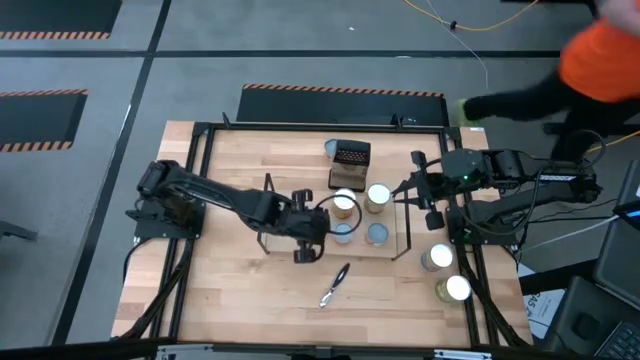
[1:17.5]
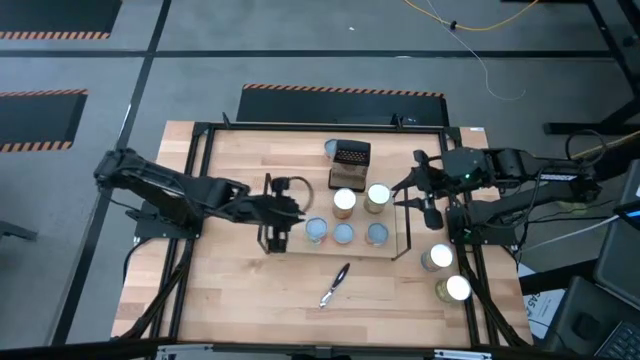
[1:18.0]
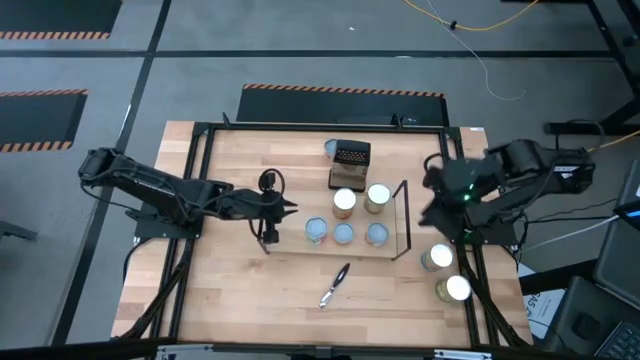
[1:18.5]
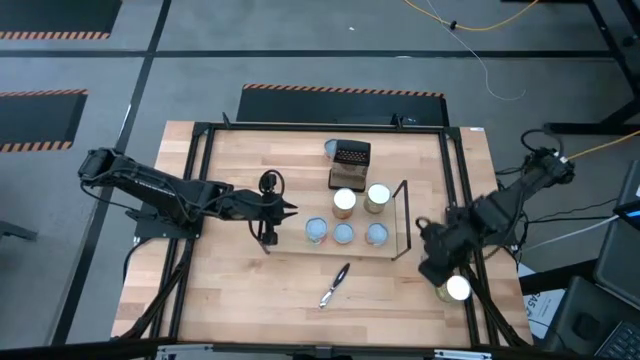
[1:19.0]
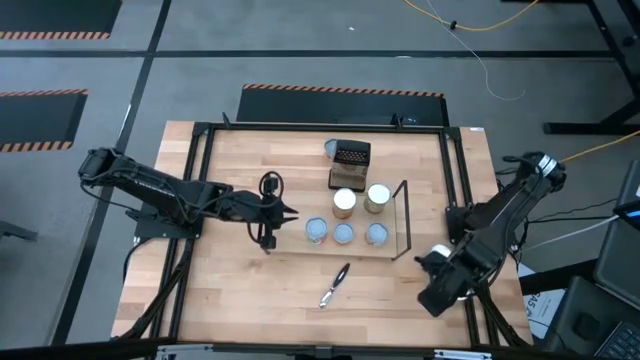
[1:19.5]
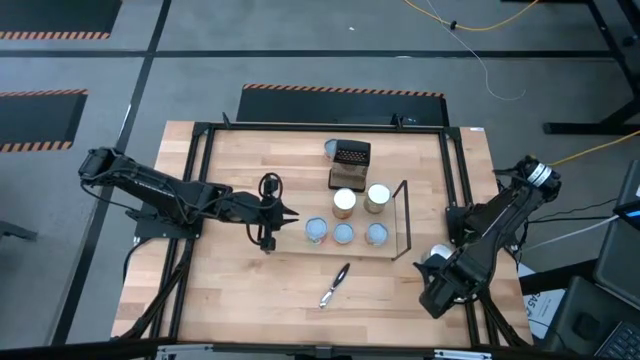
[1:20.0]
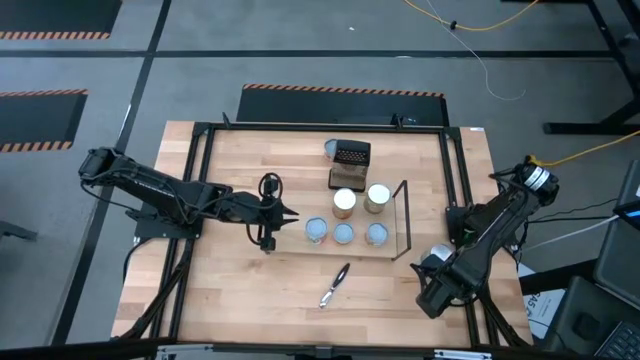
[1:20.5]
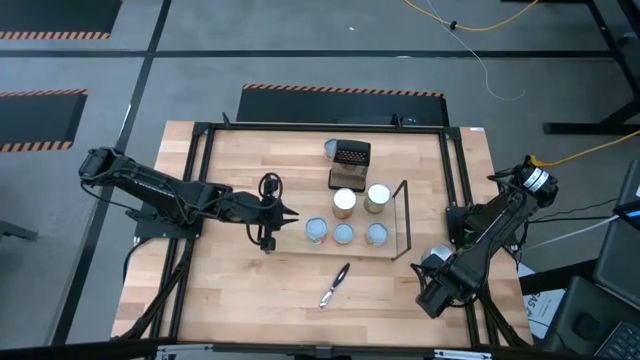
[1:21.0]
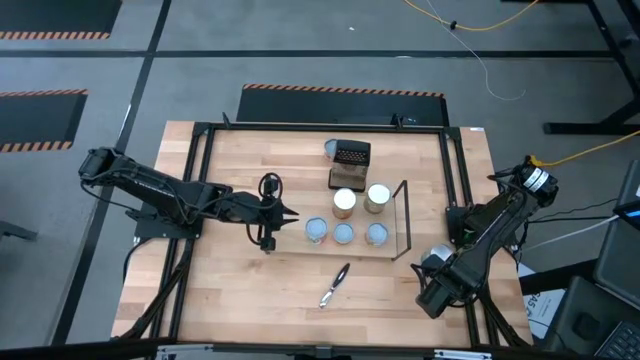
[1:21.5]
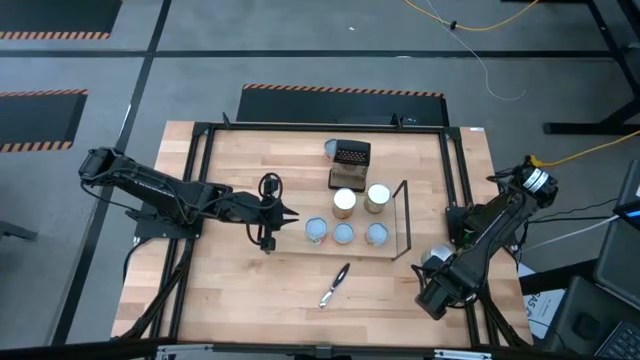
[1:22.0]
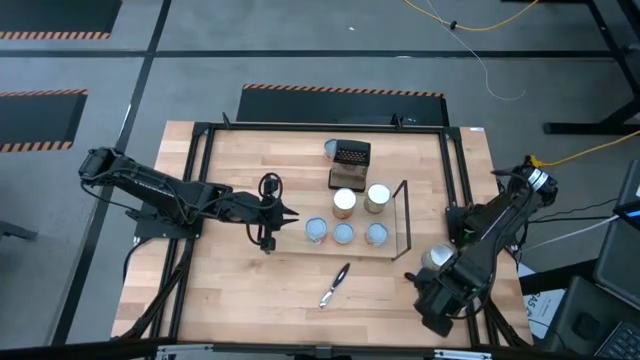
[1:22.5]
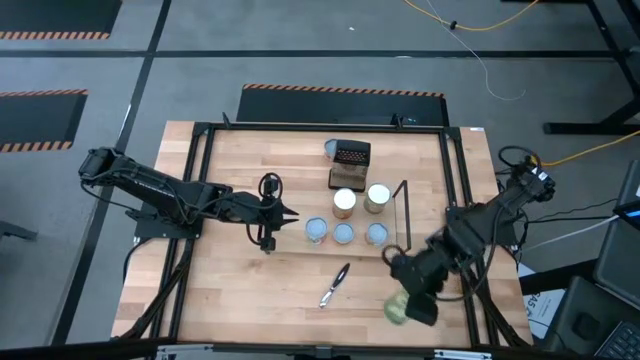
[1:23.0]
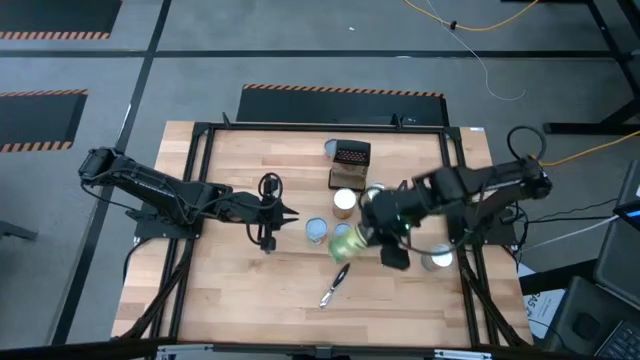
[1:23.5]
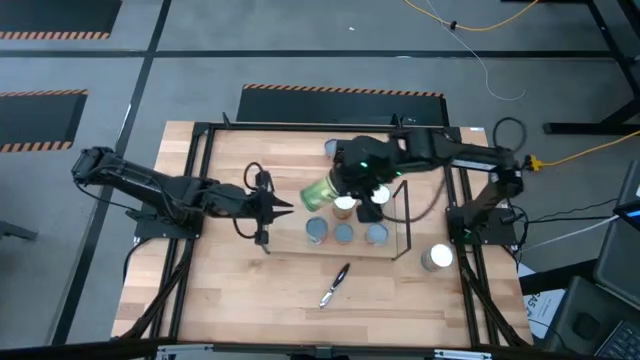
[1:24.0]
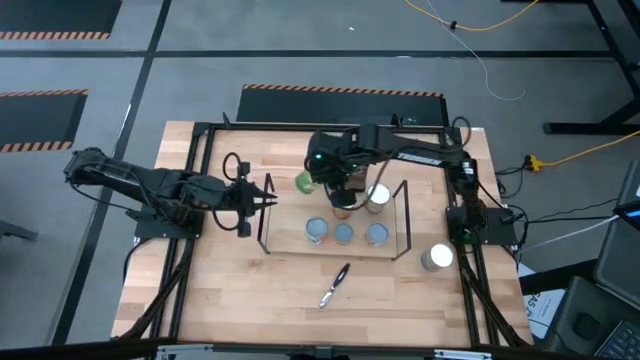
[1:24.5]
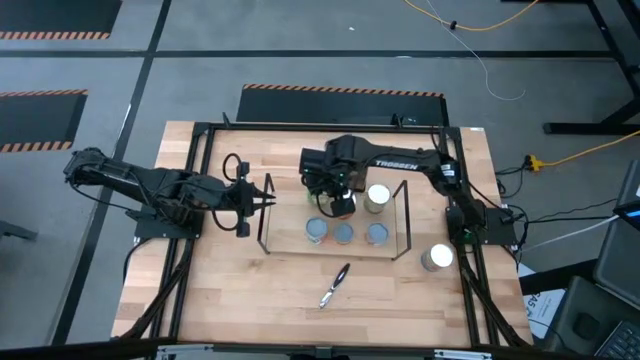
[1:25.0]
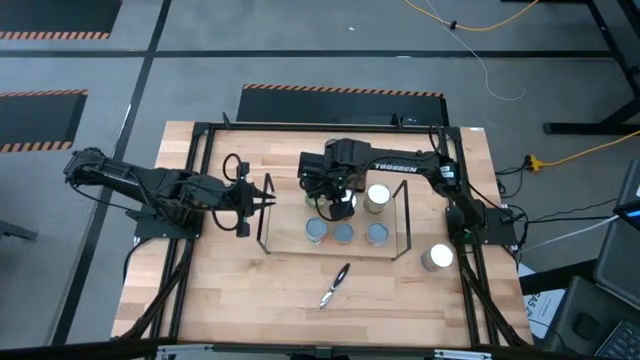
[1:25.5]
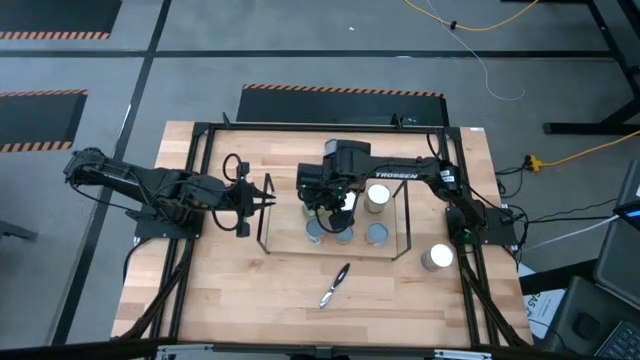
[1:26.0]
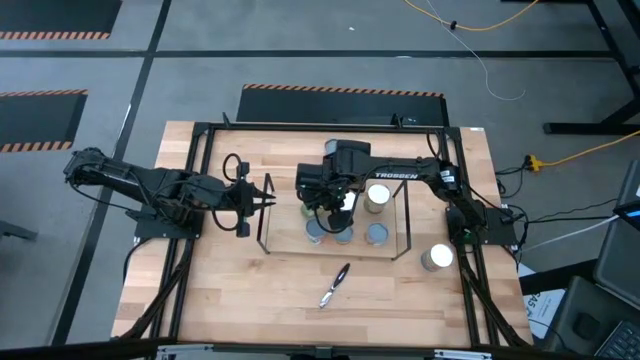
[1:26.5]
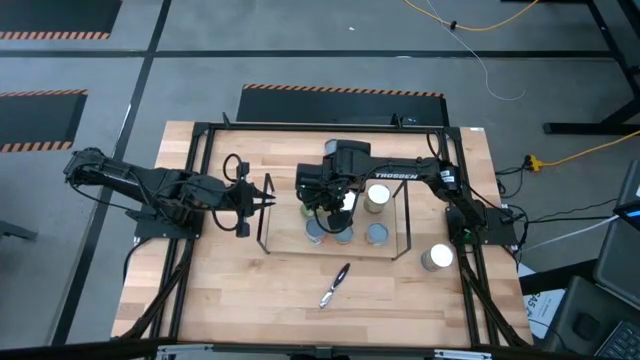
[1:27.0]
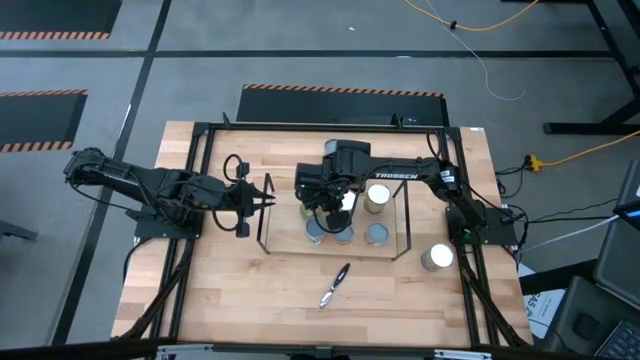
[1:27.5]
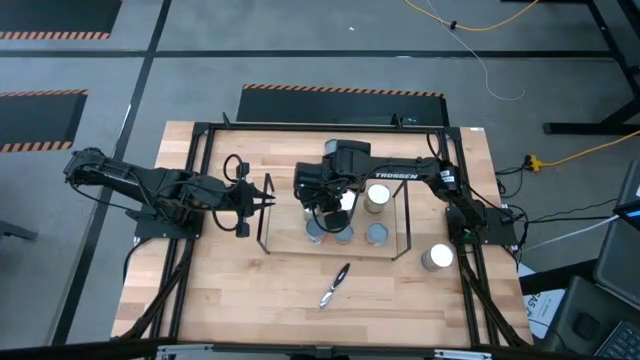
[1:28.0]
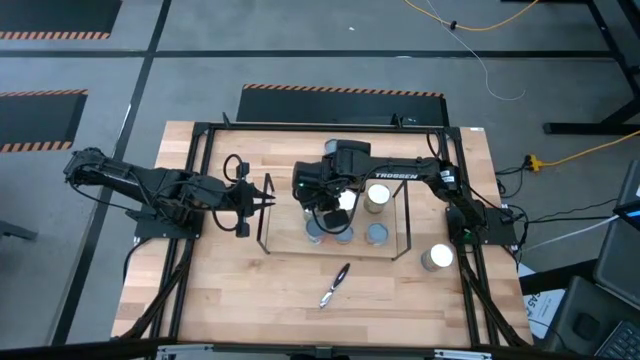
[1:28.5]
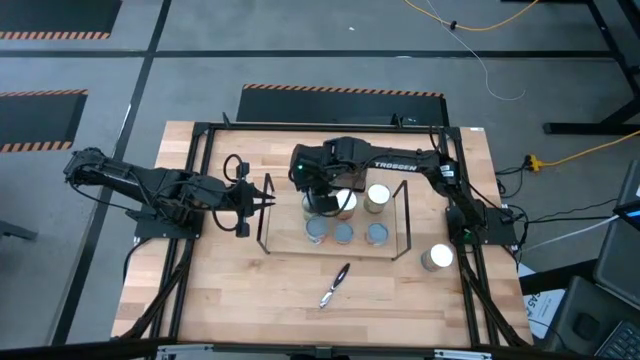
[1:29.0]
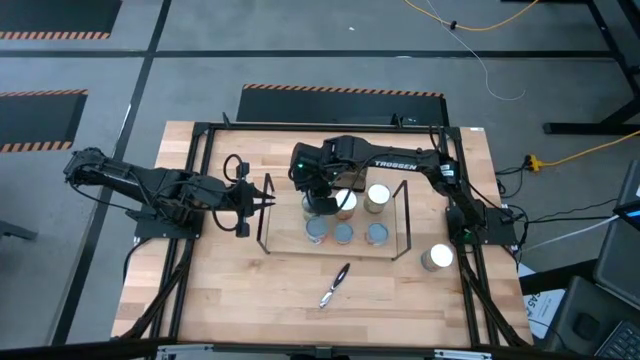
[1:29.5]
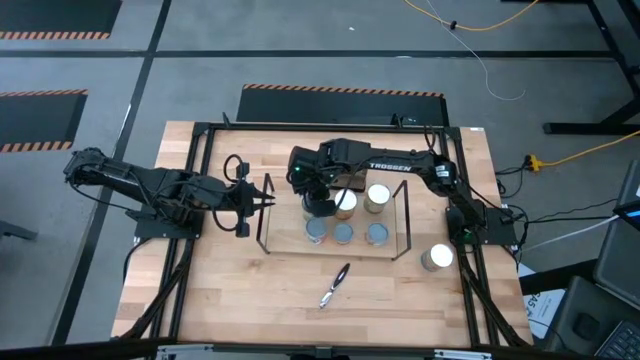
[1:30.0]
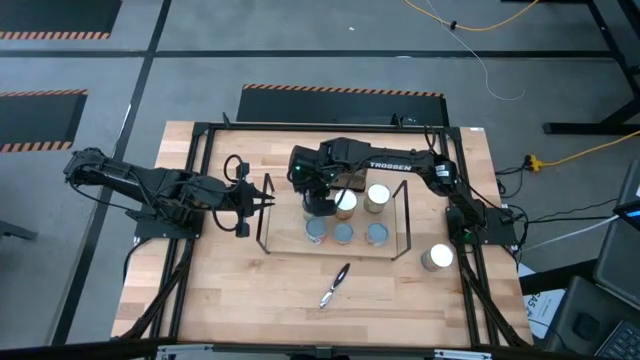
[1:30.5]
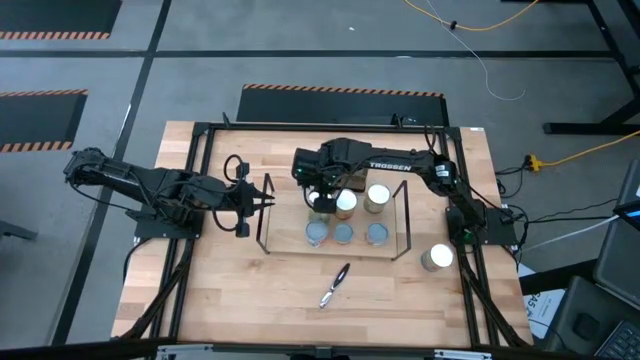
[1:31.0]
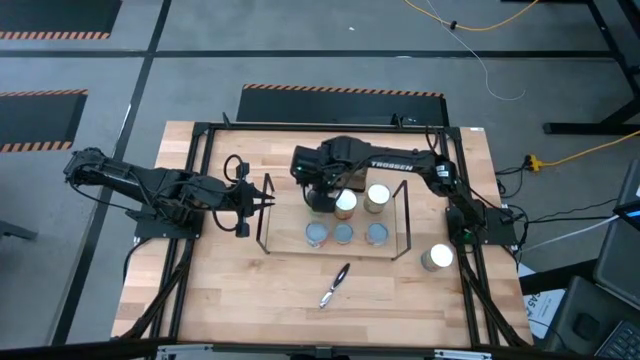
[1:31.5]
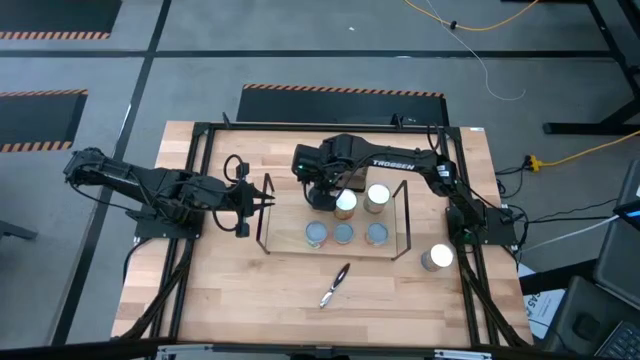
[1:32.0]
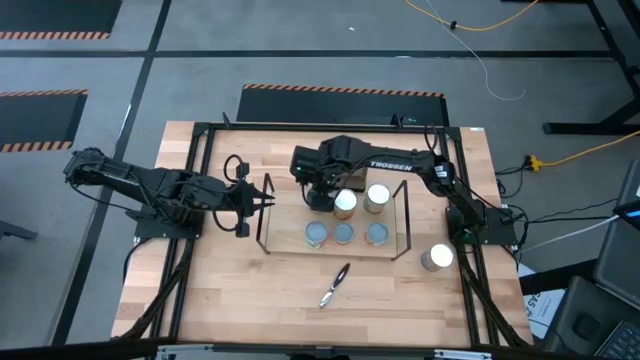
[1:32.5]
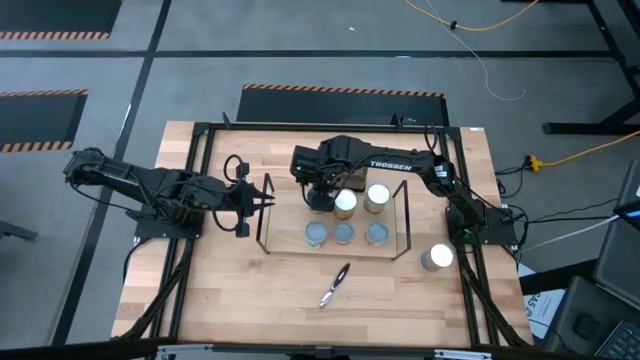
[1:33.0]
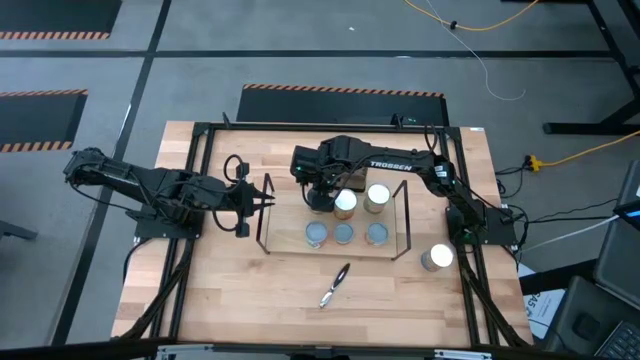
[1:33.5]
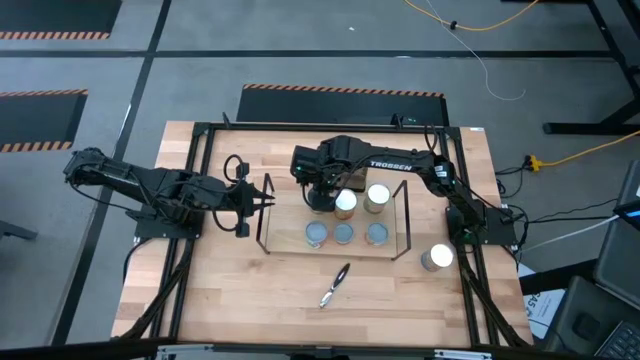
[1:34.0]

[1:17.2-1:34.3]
Task: Pick and place cans onto a shelf
Put the canned peaches on the shelf

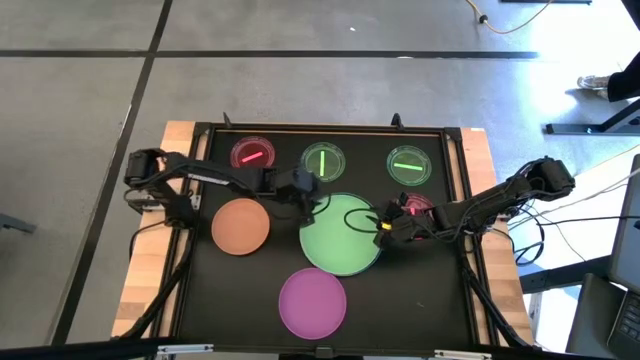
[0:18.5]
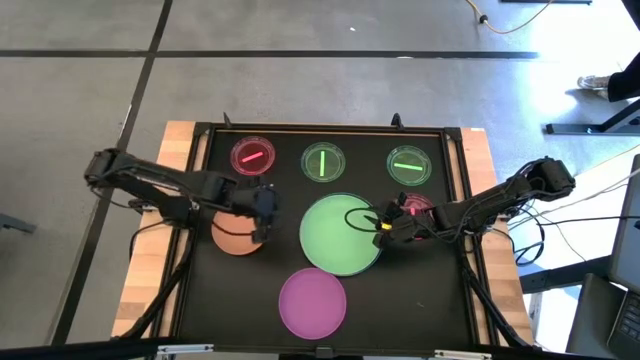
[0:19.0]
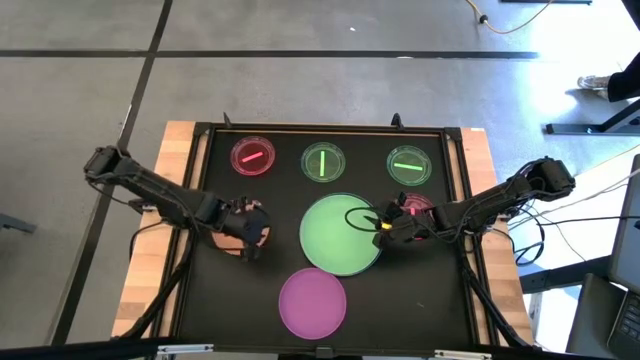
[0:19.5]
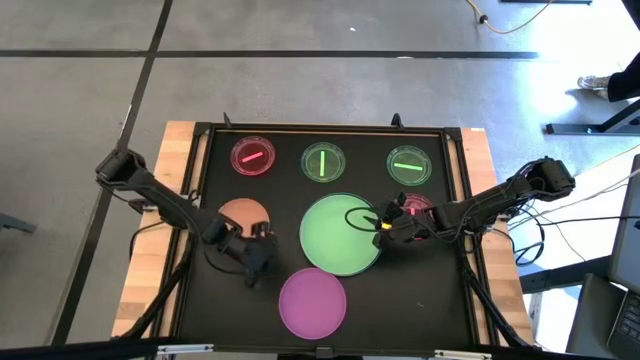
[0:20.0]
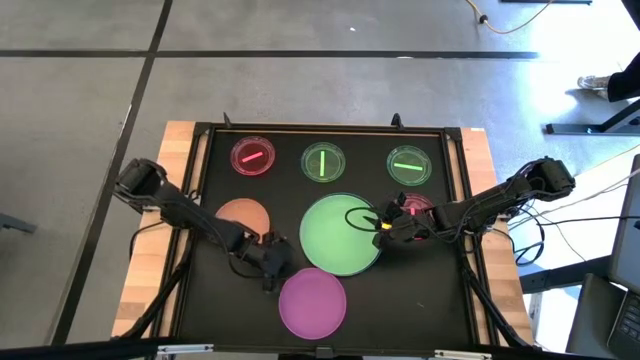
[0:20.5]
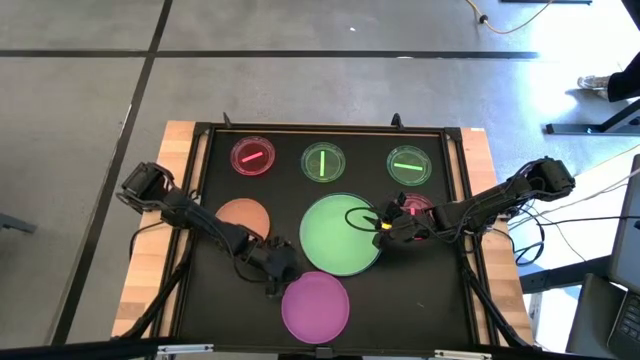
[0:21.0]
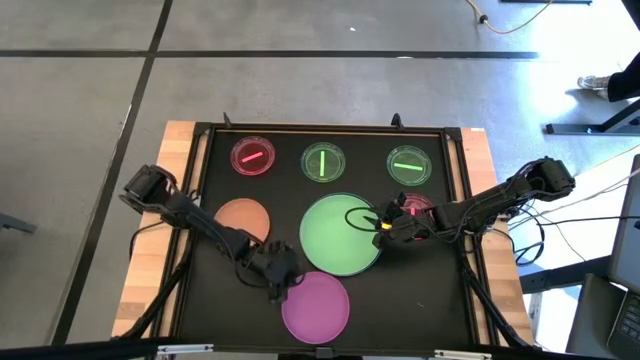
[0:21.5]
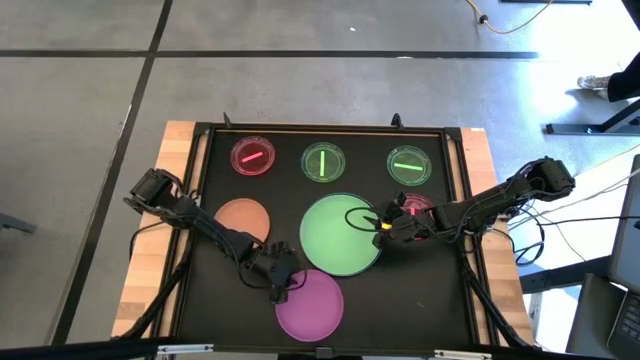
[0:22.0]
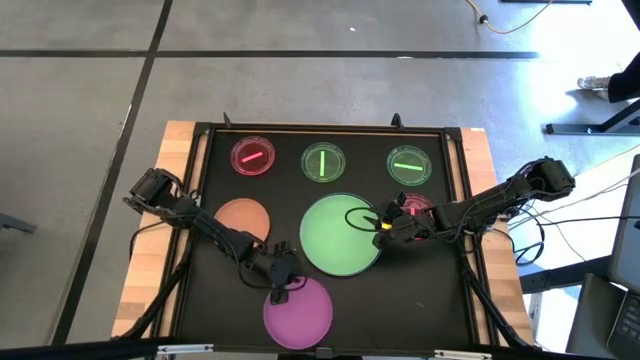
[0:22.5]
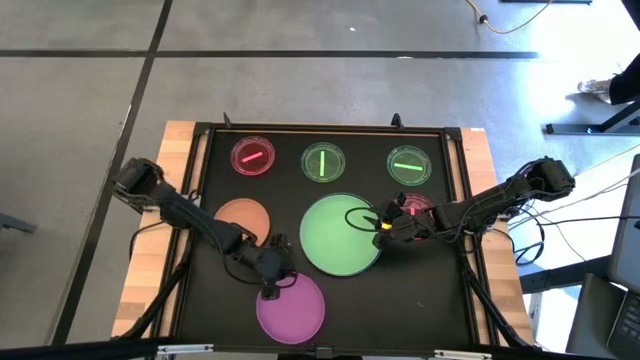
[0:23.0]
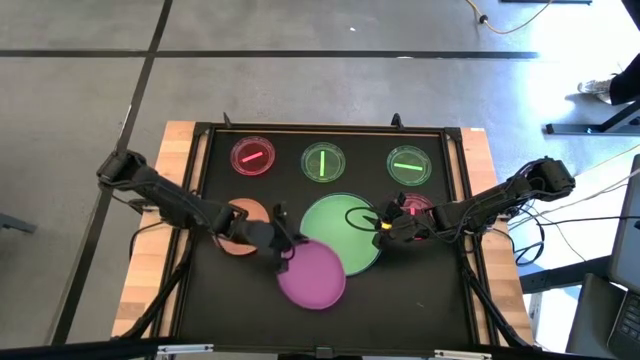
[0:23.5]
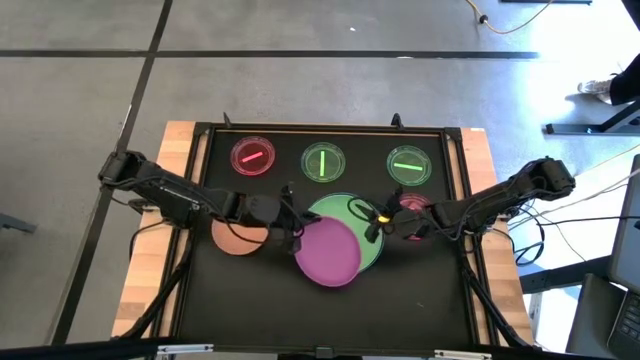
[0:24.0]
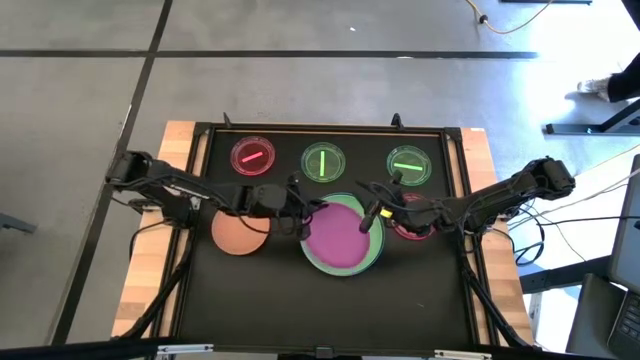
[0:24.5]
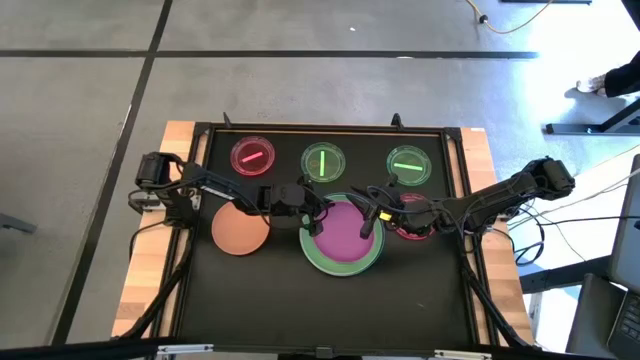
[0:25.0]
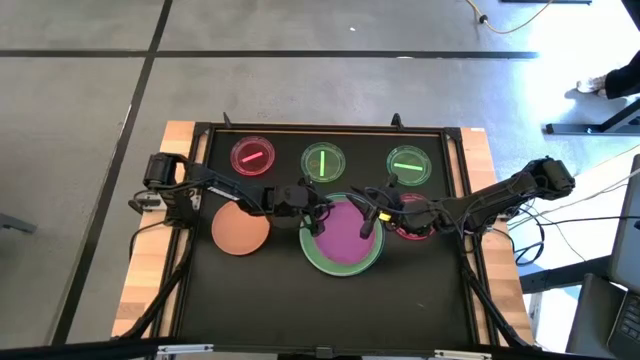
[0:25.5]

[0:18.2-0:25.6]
Task: Stack plastic plates
Stack the pink plate on the green plate
